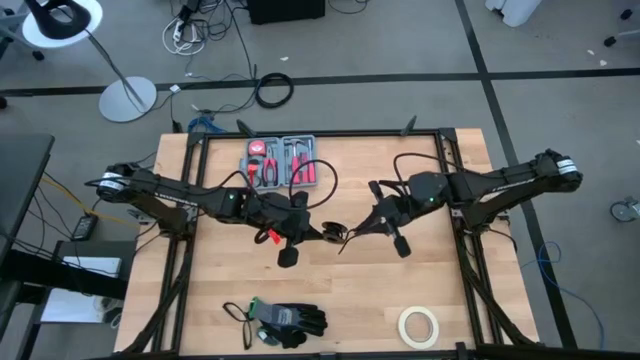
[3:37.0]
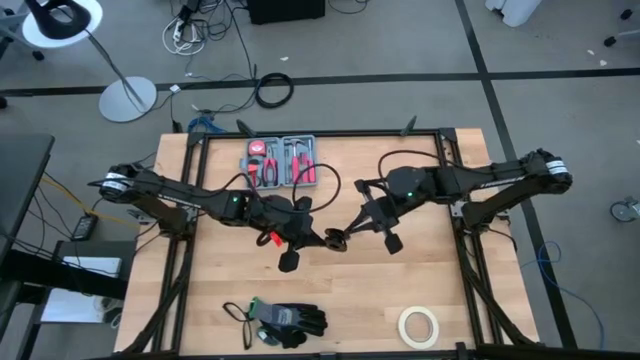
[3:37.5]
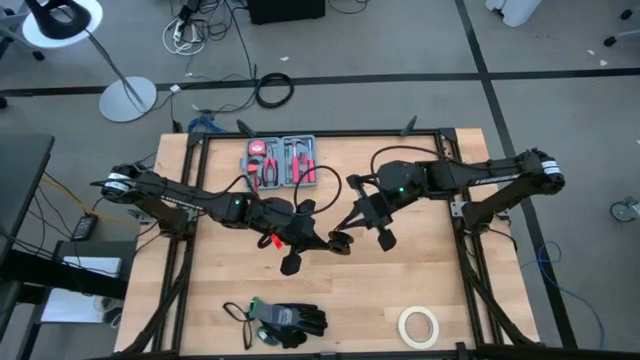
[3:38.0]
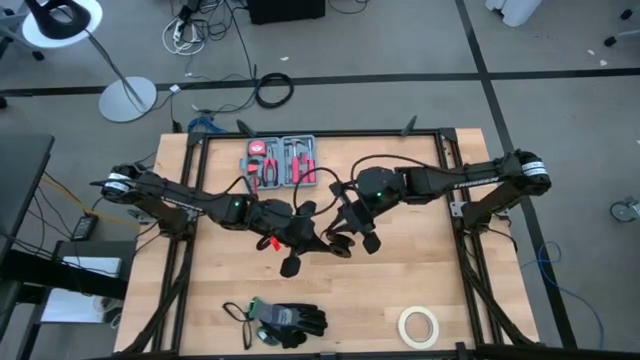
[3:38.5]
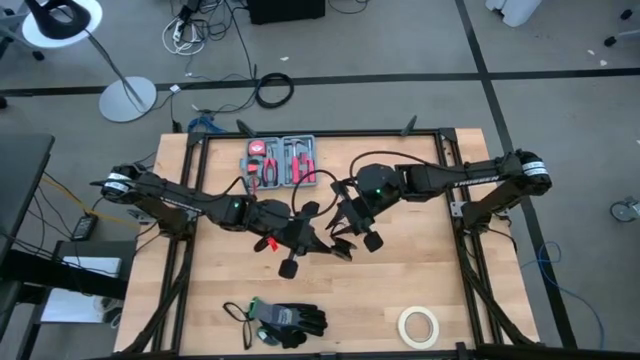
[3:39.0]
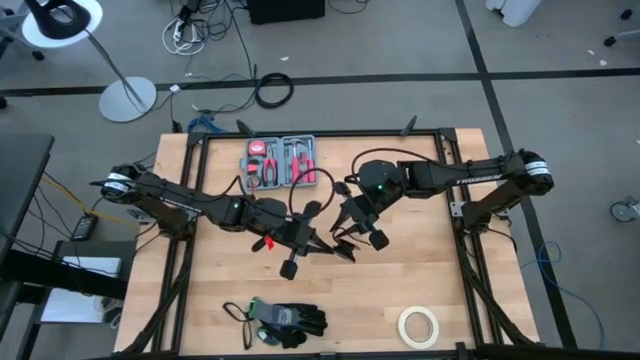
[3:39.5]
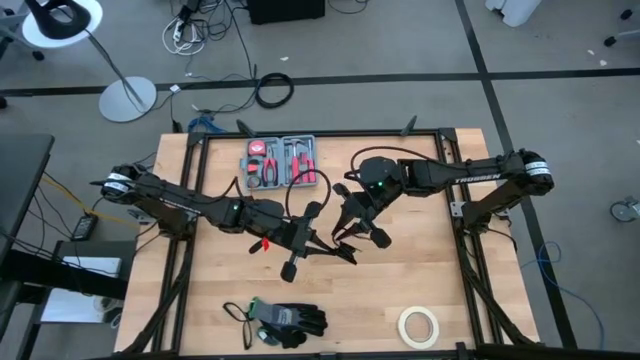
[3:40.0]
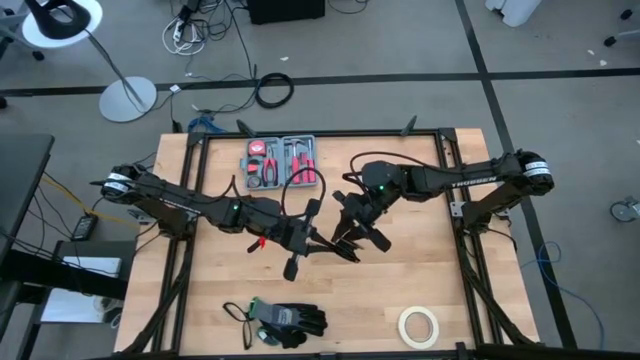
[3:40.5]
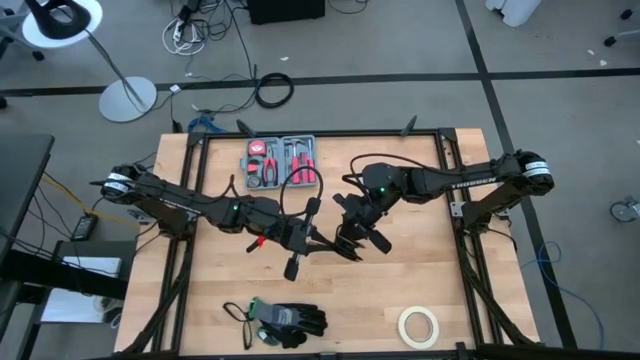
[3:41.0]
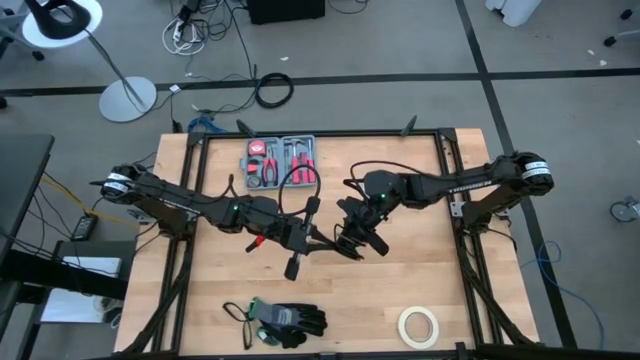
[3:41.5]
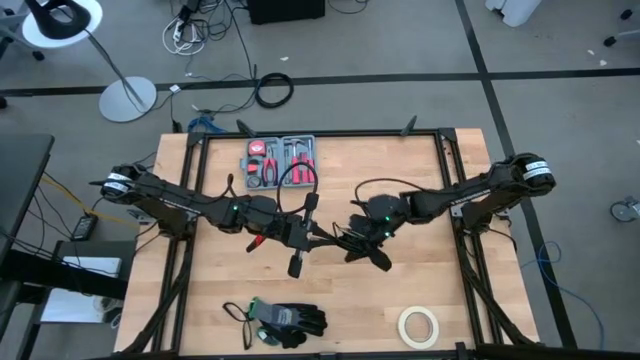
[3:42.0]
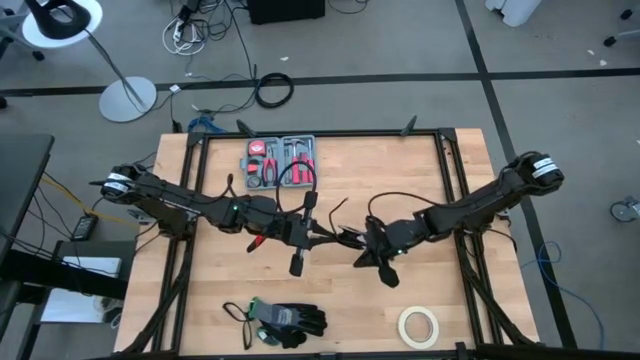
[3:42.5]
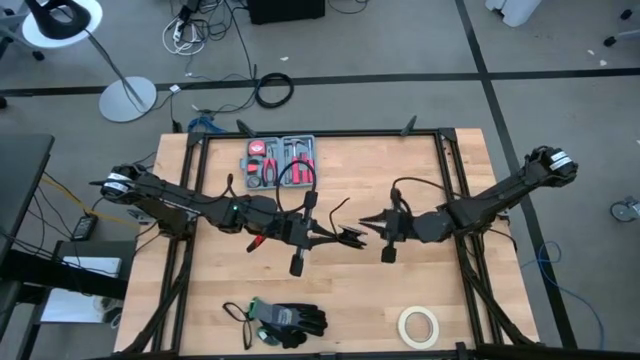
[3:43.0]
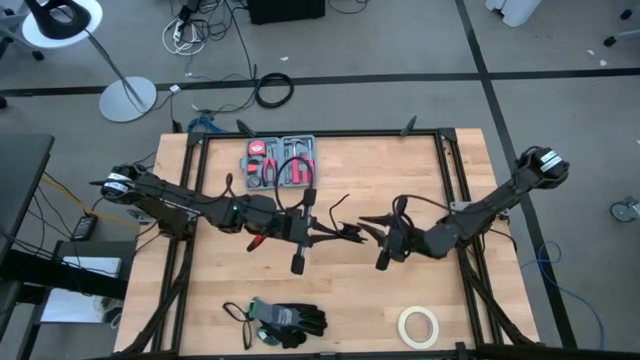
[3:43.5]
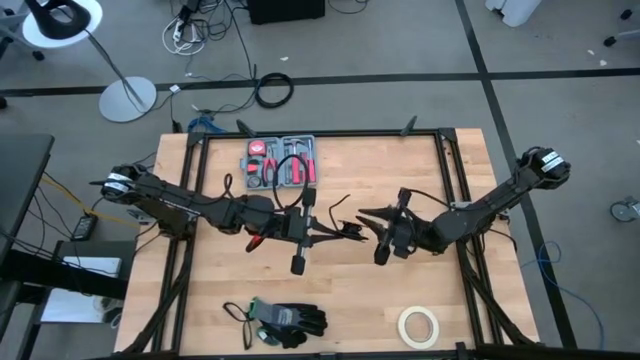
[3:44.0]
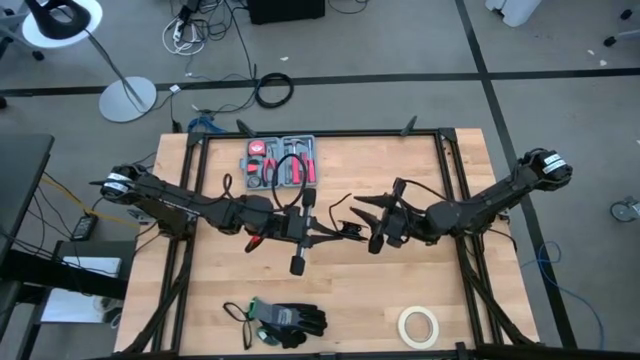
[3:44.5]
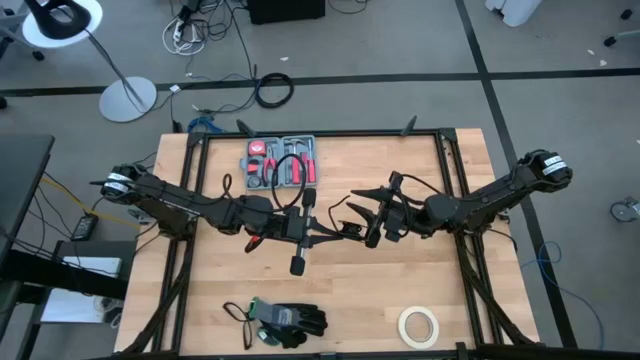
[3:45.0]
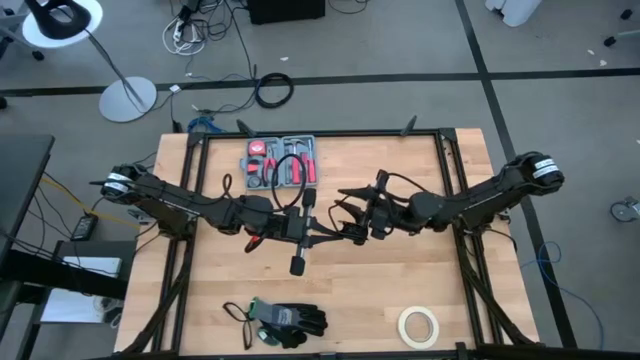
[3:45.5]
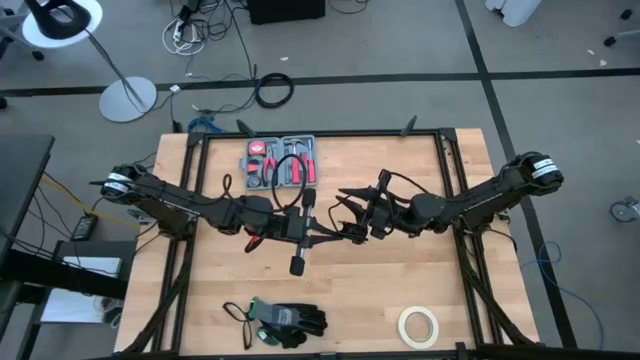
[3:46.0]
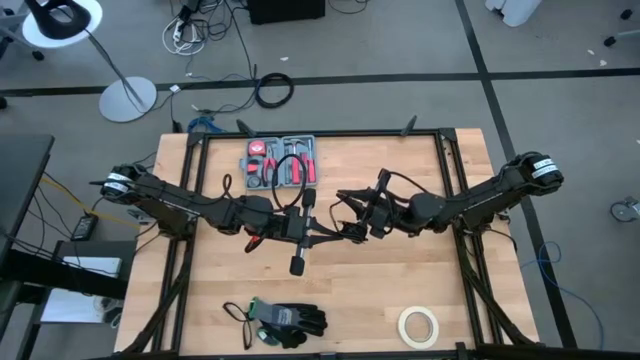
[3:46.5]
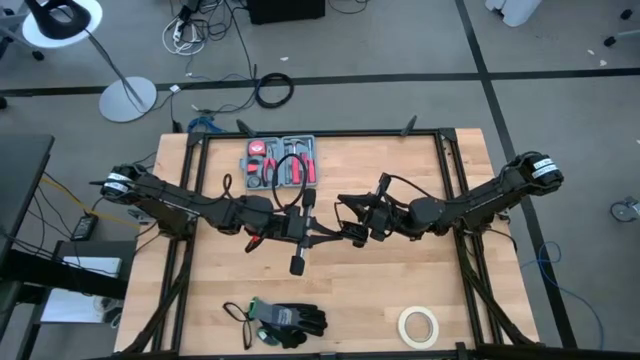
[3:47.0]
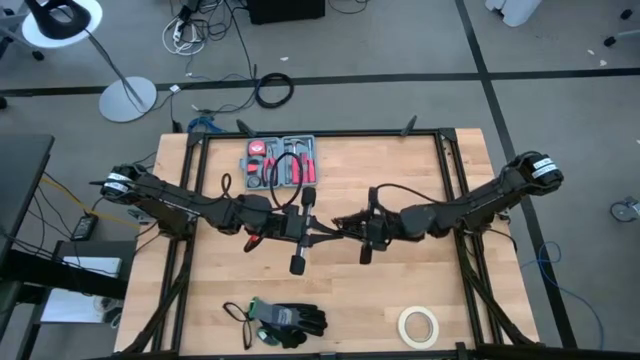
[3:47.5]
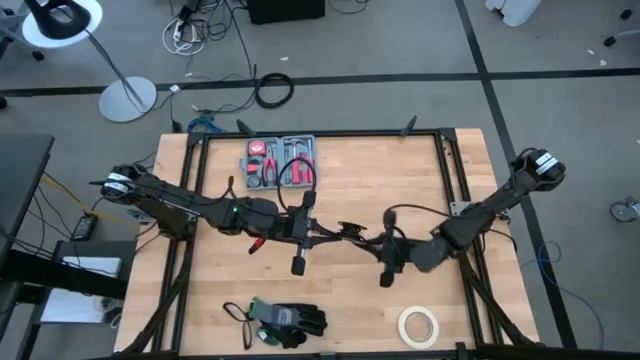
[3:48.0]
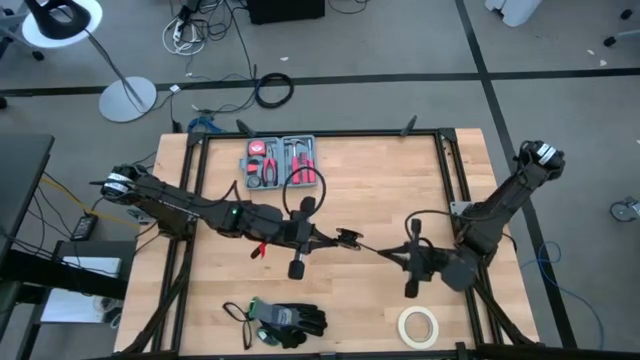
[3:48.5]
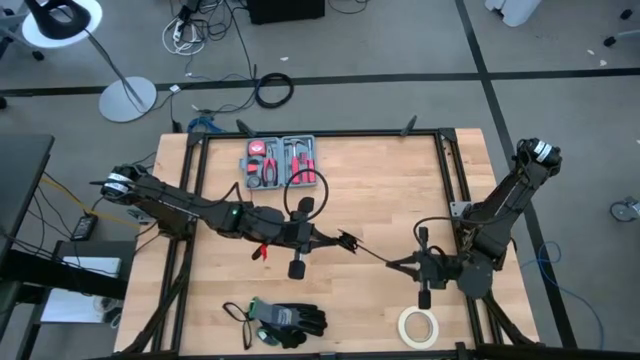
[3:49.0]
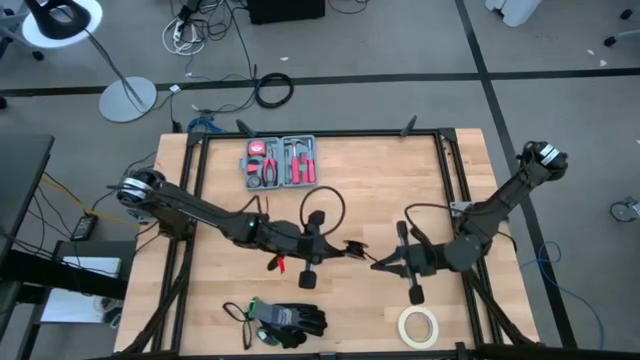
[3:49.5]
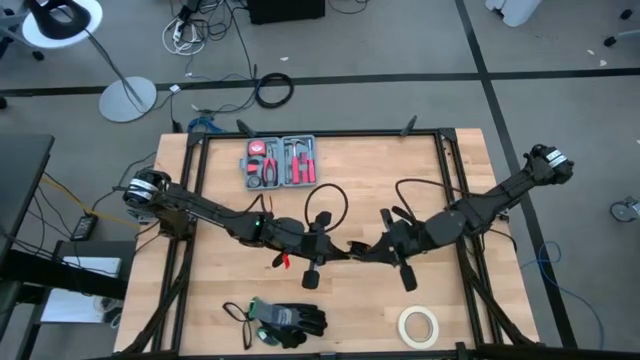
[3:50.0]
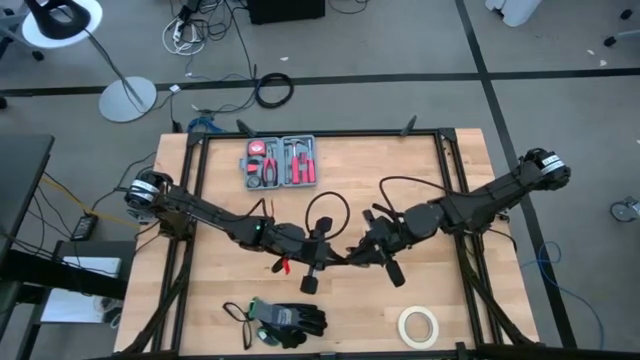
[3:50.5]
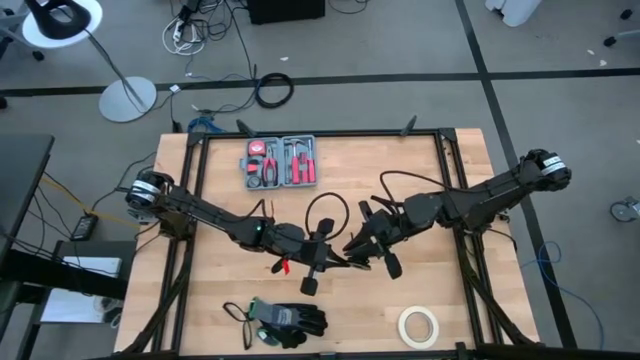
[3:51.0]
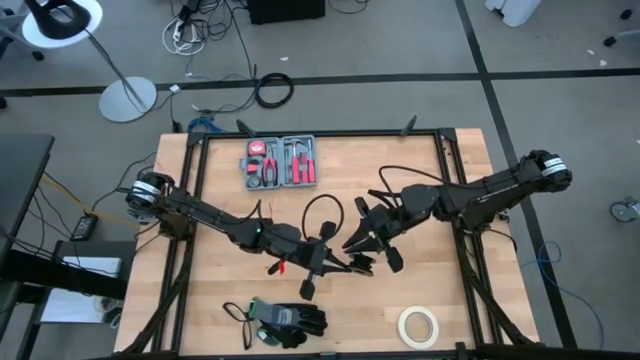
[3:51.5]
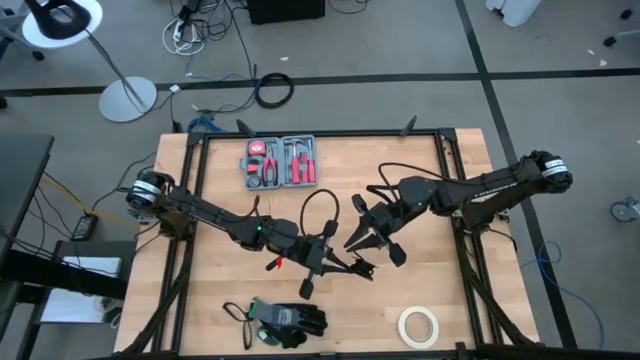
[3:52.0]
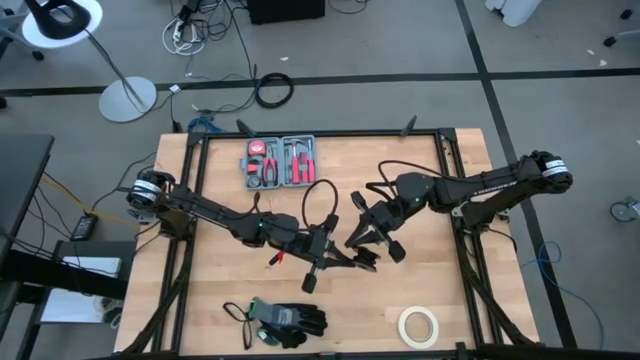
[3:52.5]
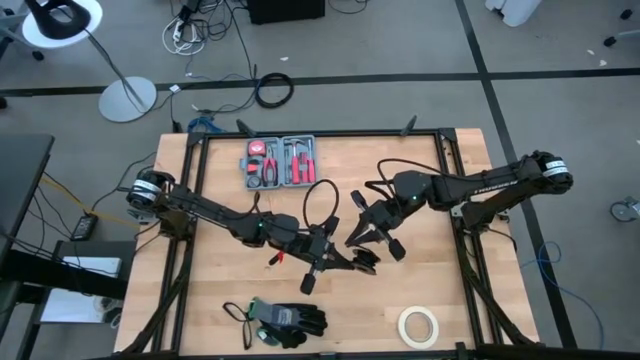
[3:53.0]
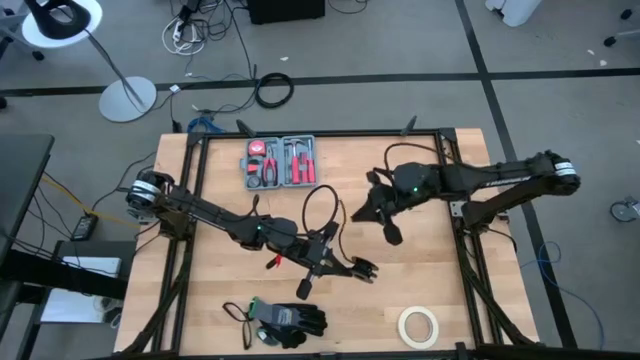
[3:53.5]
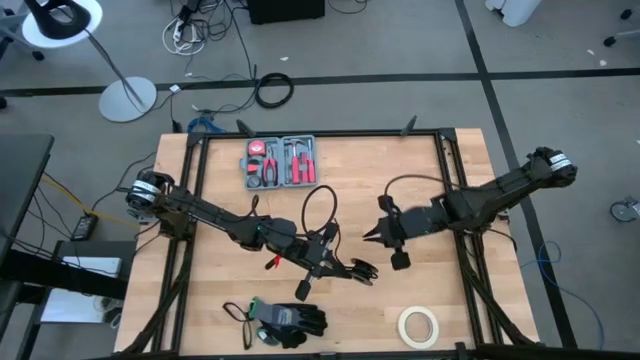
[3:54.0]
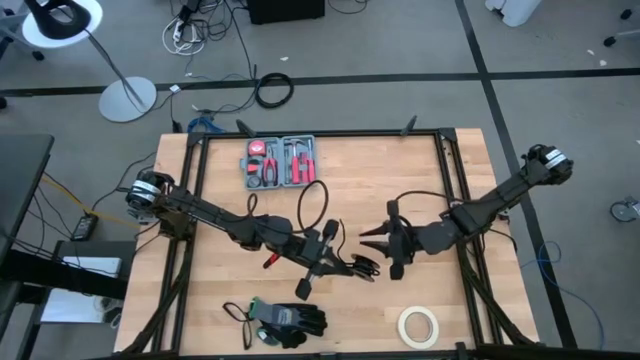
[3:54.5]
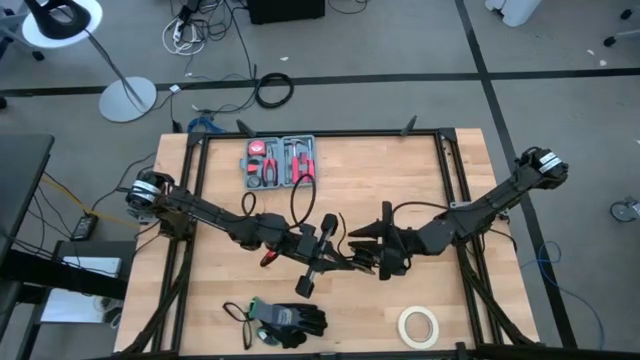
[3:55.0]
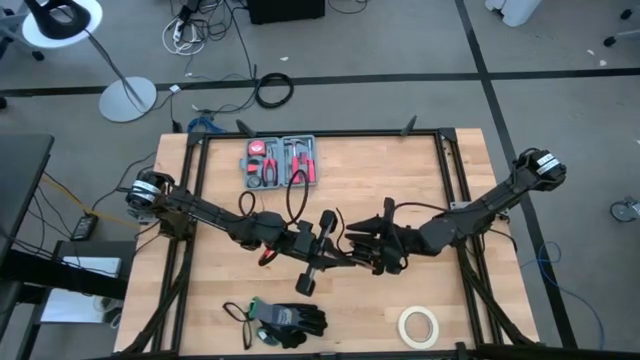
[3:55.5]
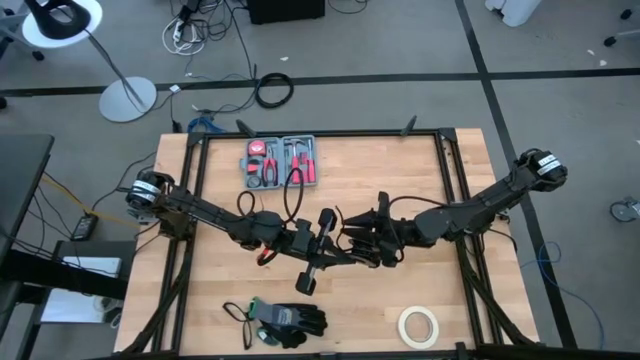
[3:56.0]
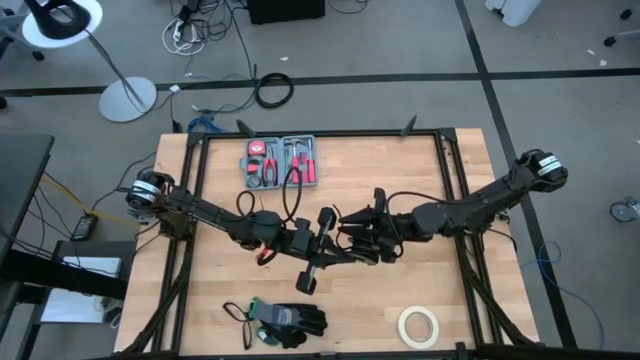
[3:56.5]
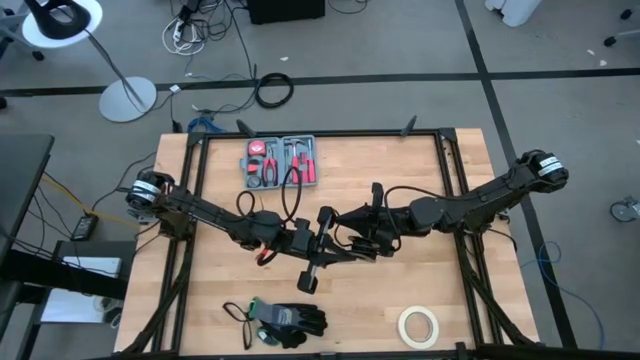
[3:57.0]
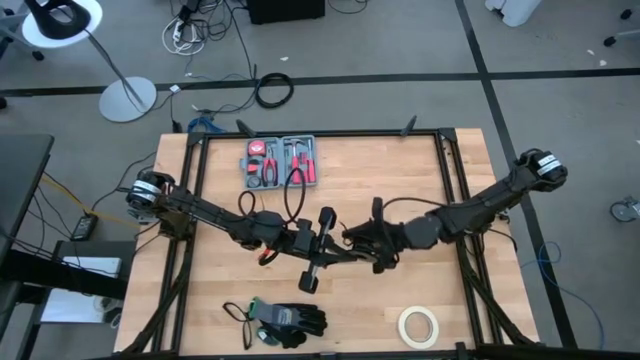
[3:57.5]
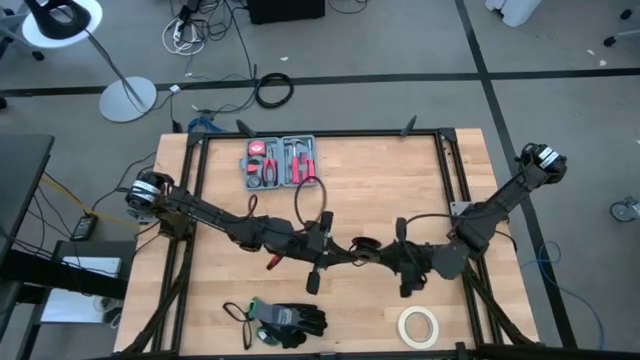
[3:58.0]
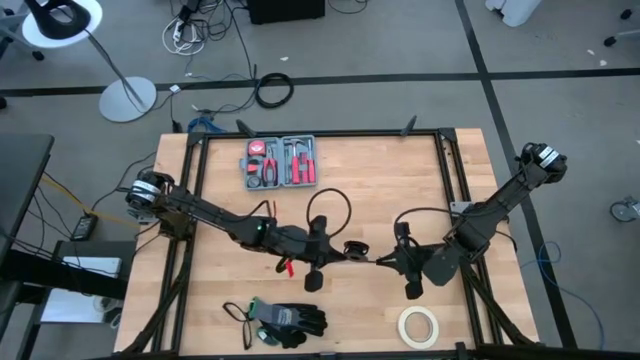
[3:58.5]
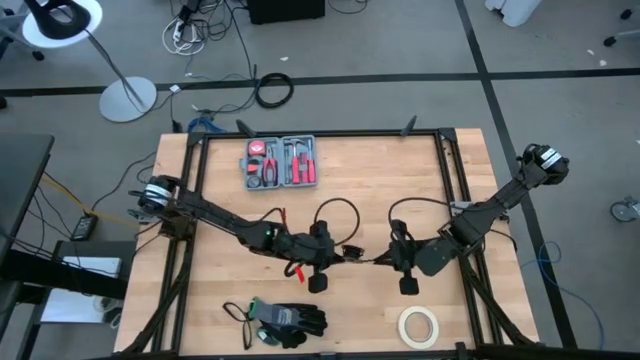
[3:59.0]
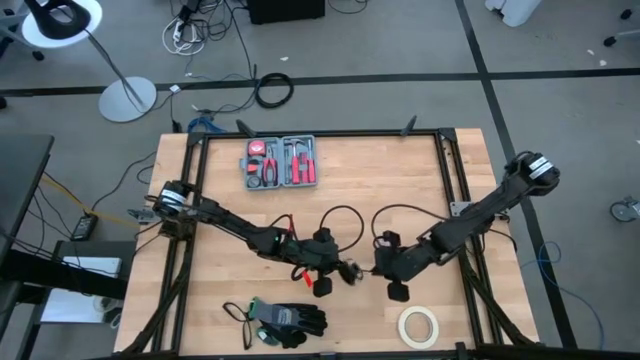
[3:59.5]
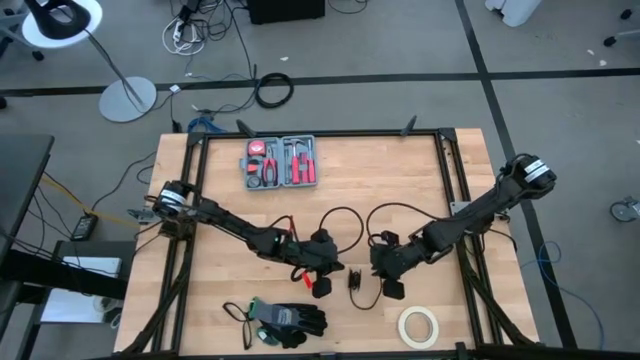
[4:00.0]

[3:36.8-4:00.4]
Task: Coil cords
Coil the black wire cable into the black spool
